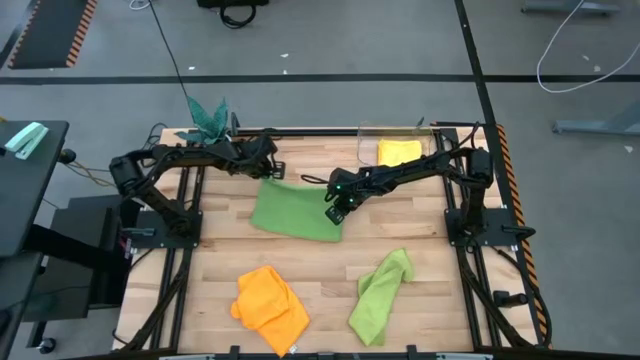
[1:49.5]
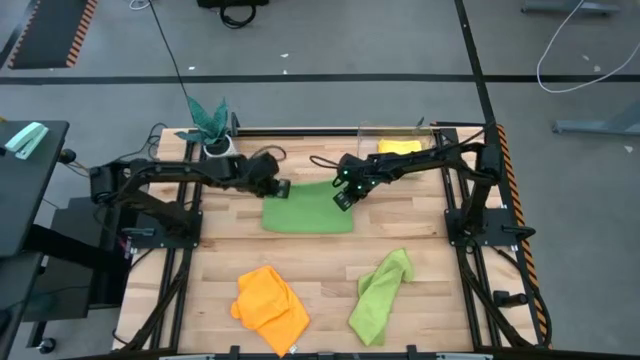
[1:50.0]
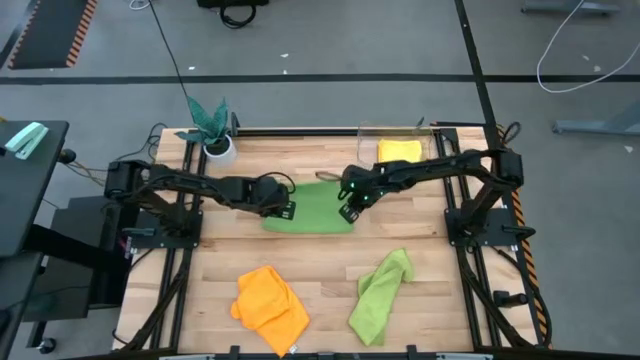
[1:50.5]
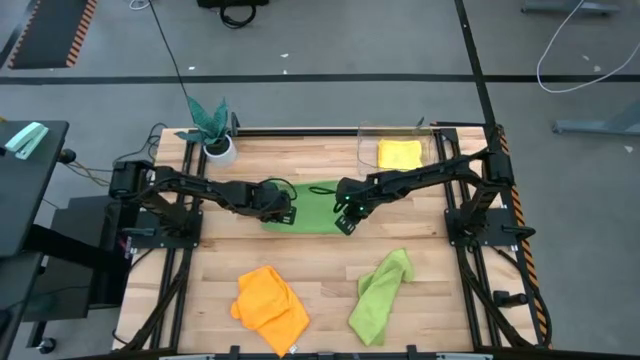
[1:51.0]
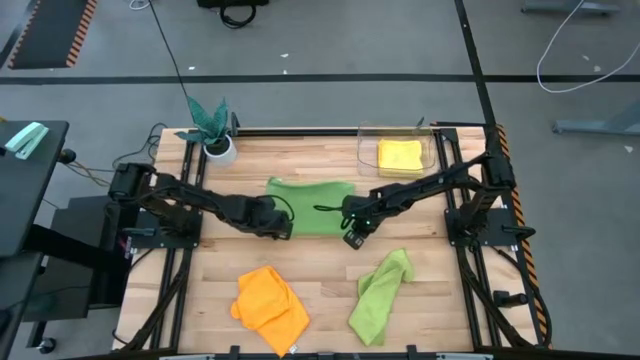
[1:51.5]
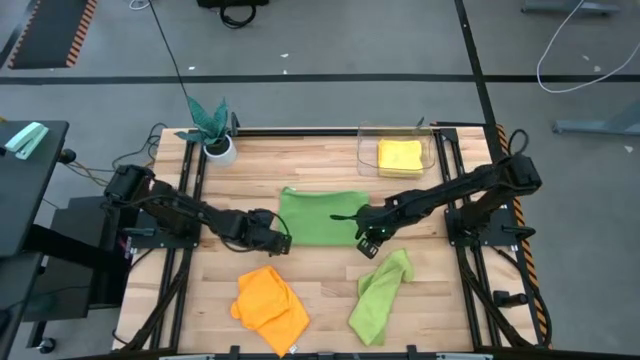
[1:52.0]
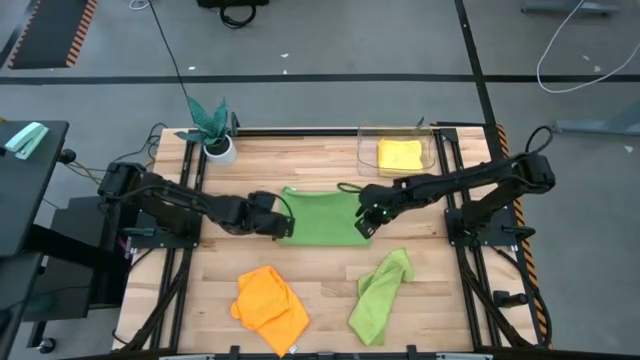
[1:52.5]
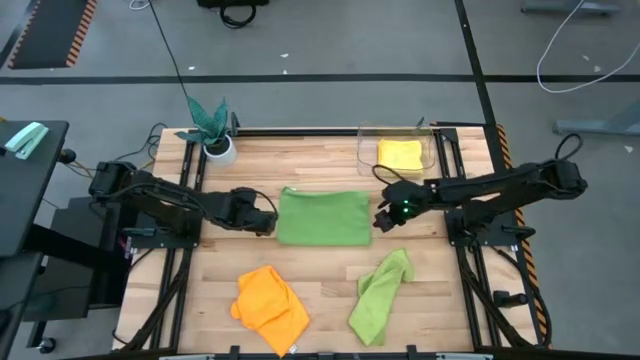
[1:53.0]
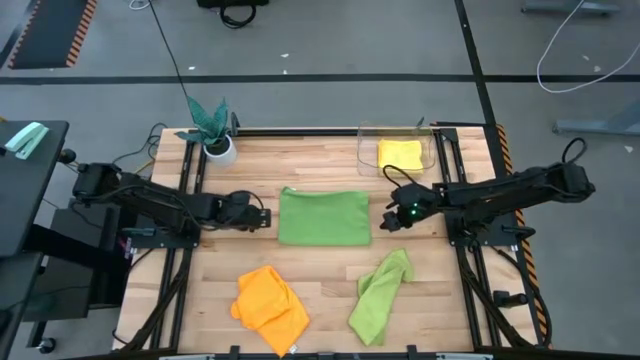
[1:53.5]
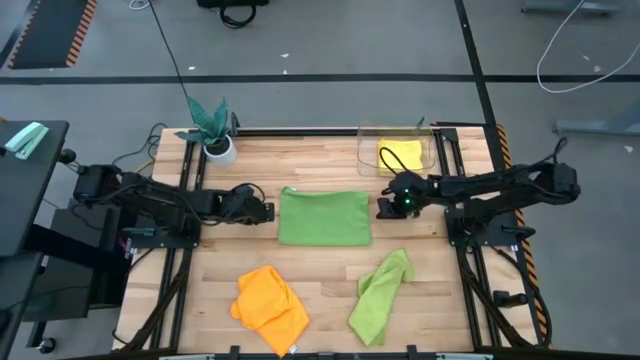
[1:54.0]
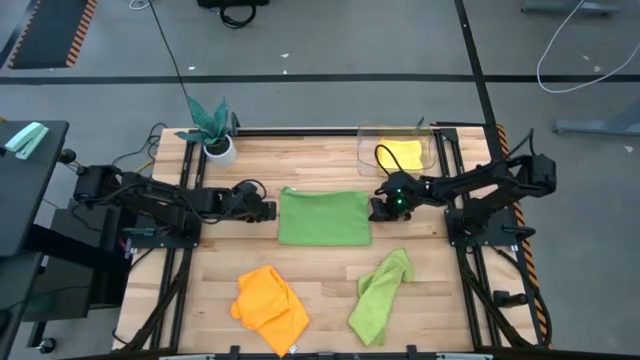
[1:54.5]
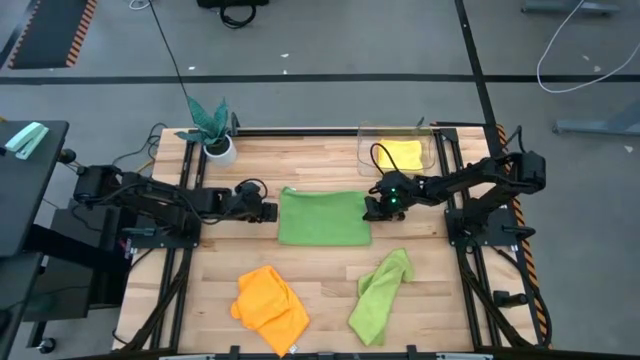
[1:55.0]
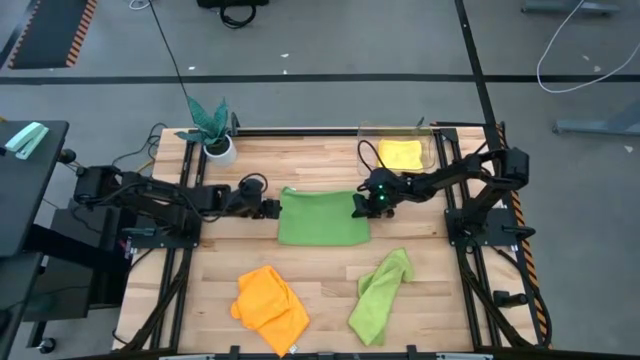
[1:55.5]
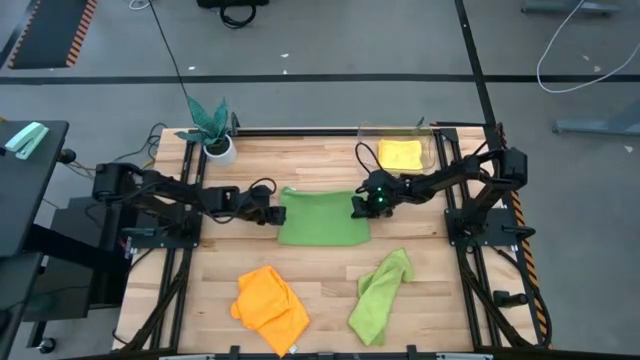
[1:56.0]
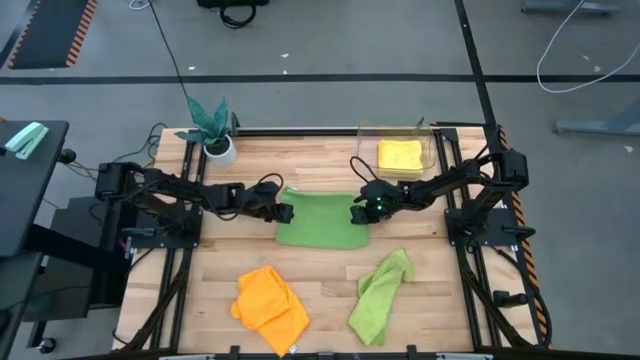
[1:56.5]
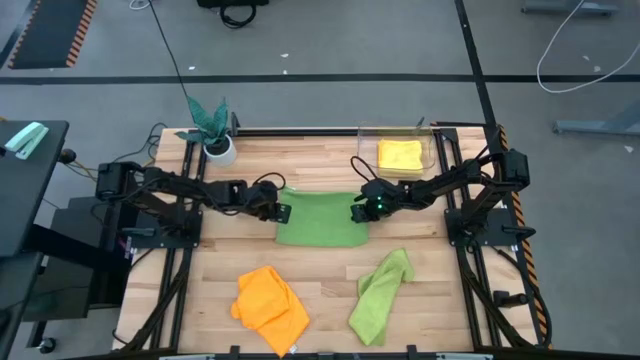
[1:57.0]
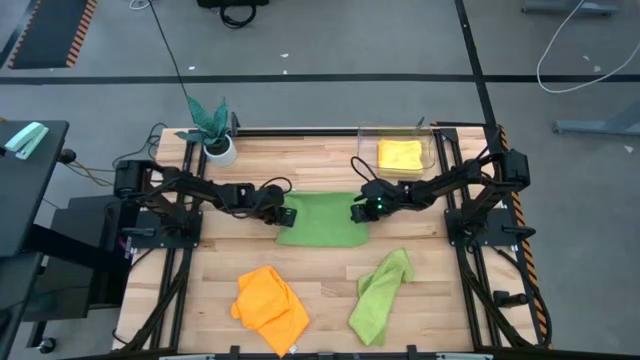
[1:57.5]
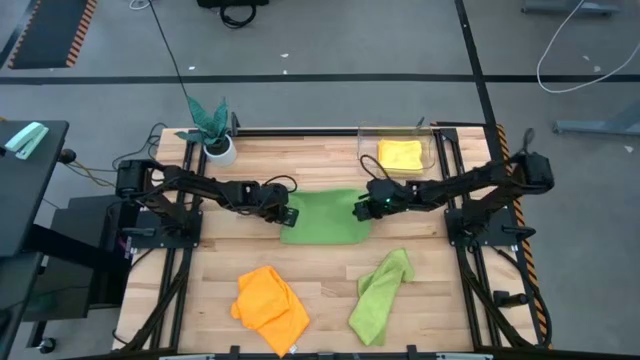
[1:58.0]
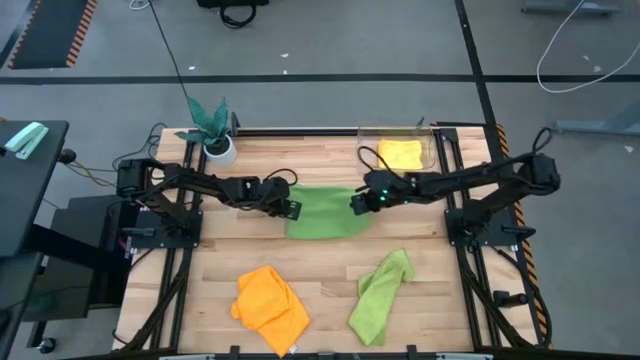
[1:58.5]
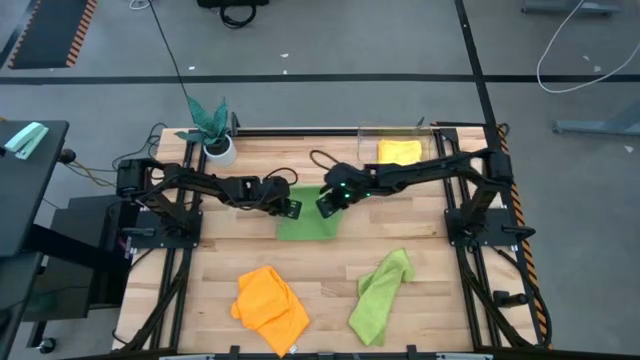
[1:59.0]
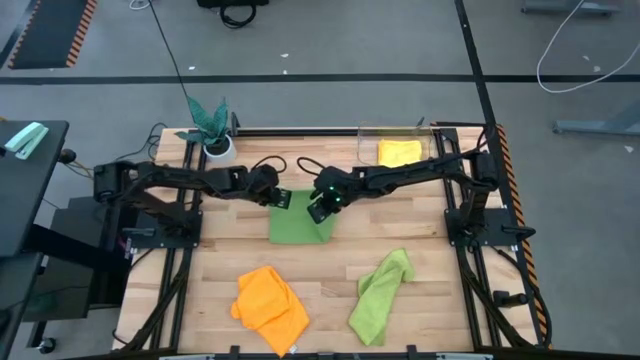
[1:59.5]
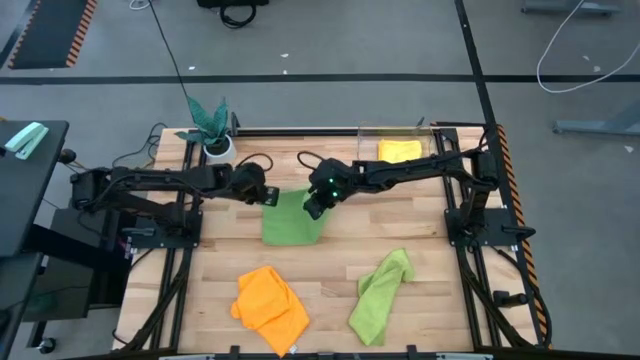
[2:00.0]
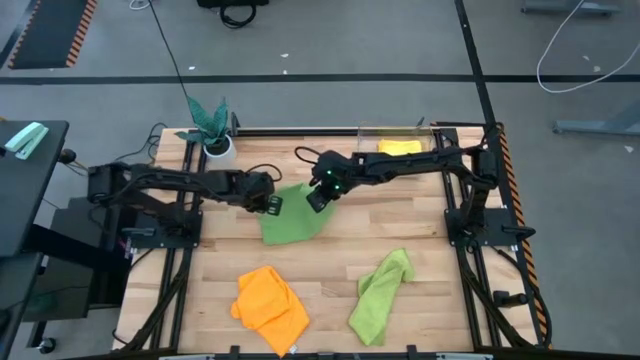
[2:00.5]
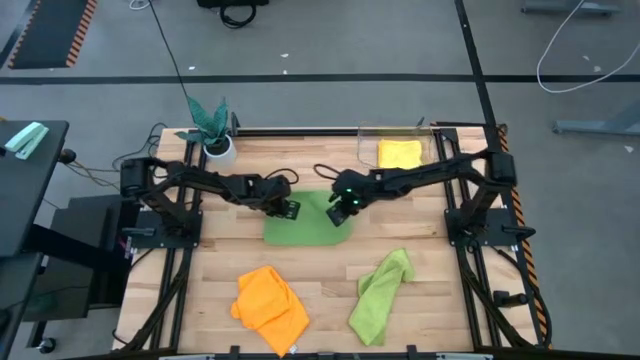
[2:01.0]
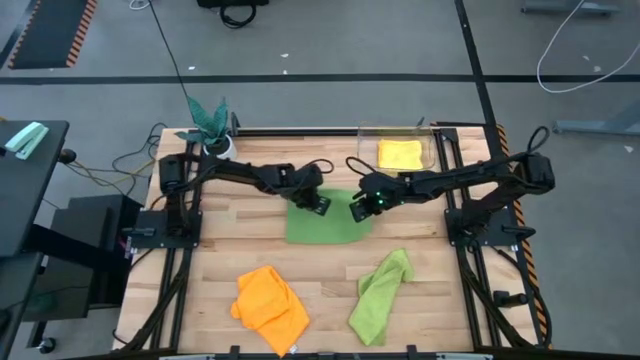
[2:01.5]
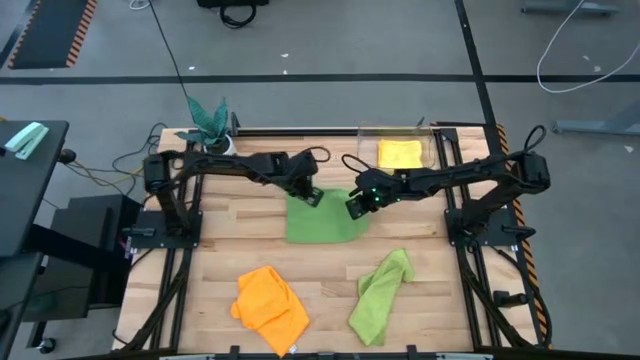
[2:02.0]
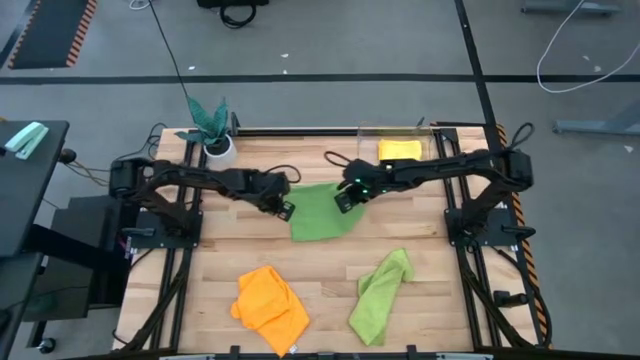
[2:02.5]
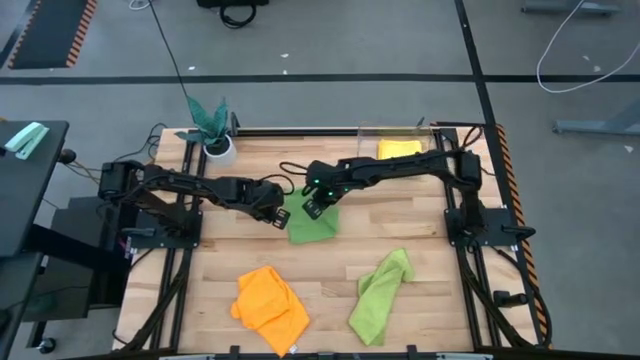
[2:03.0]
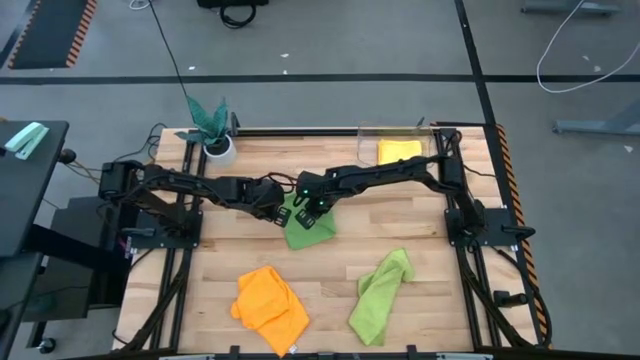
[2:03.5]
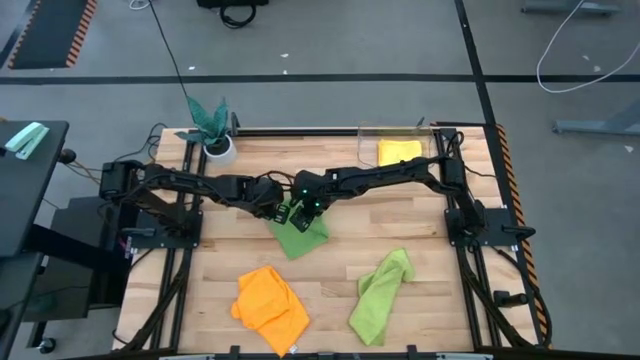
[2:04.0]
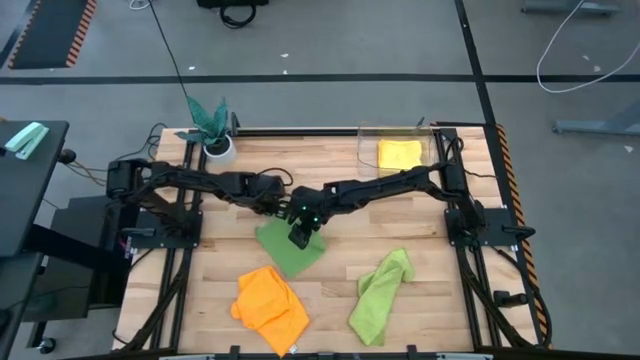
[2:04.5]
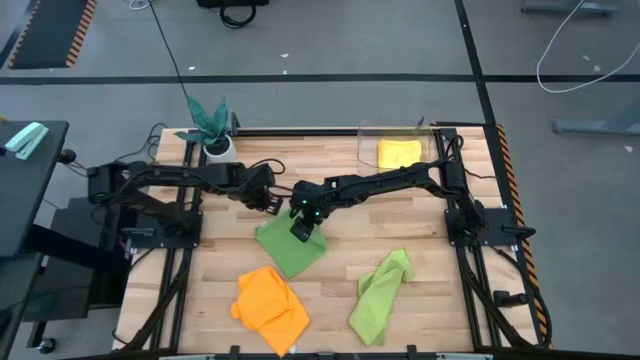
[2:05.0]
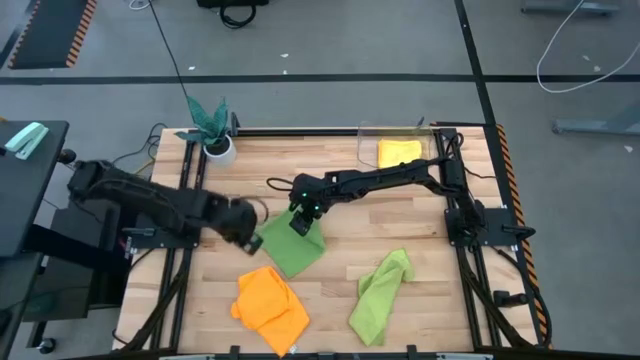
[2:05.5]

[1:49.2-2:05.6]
Task: Fold microfiber towels
Fold the green towel

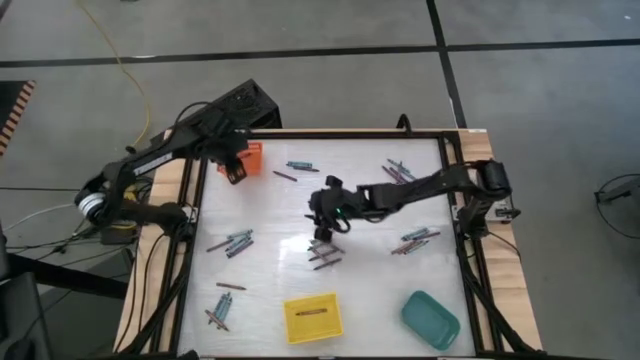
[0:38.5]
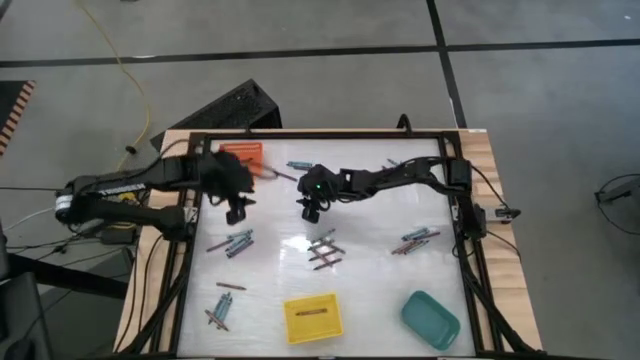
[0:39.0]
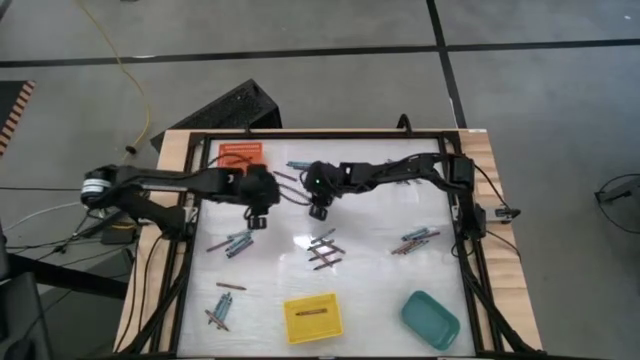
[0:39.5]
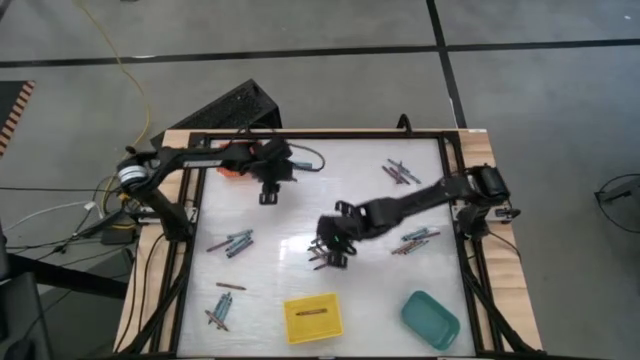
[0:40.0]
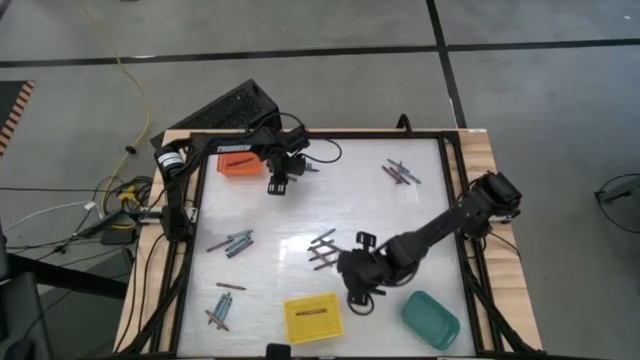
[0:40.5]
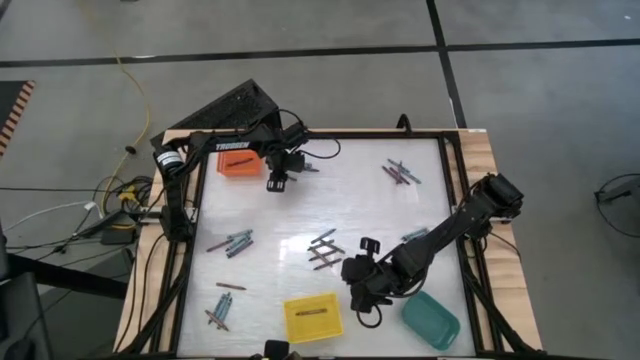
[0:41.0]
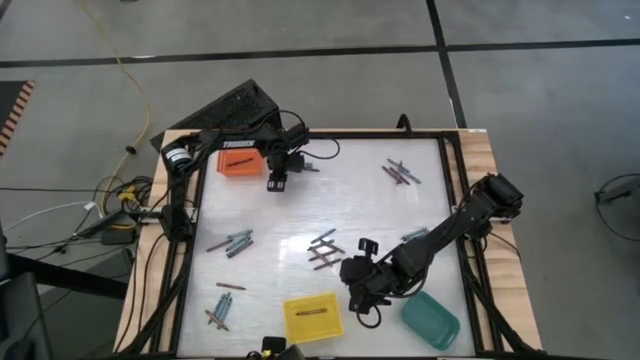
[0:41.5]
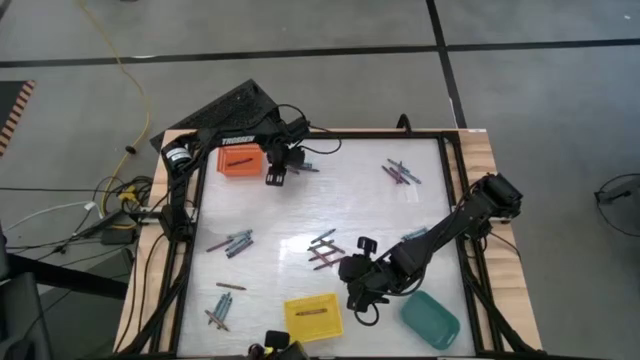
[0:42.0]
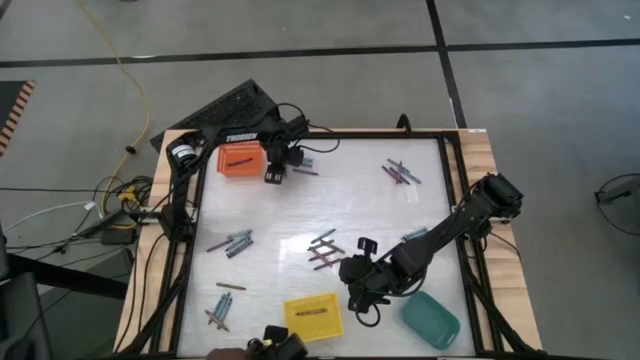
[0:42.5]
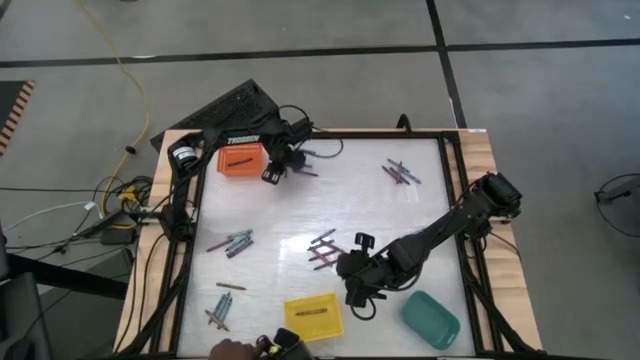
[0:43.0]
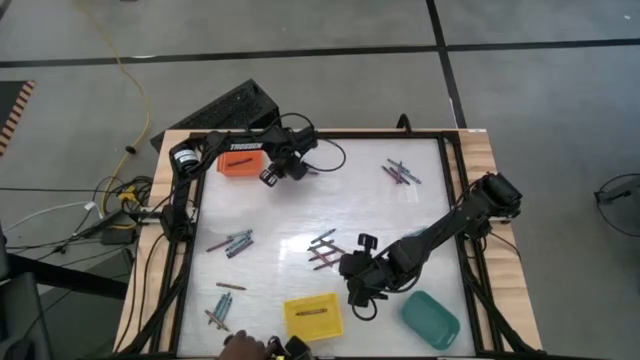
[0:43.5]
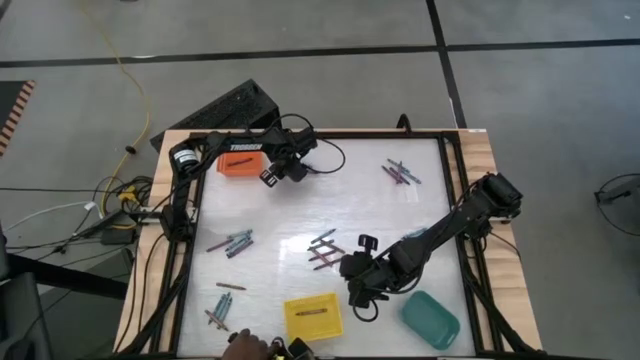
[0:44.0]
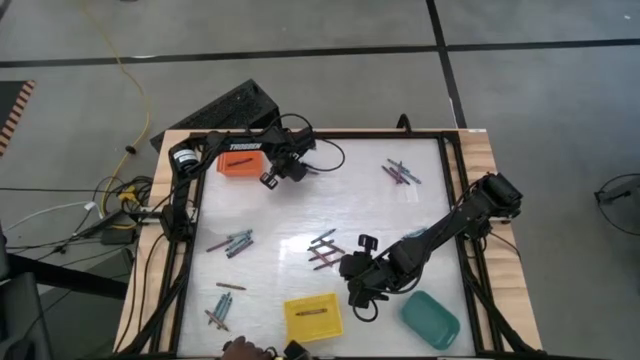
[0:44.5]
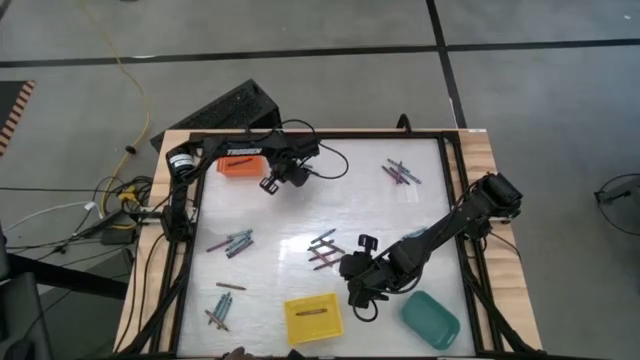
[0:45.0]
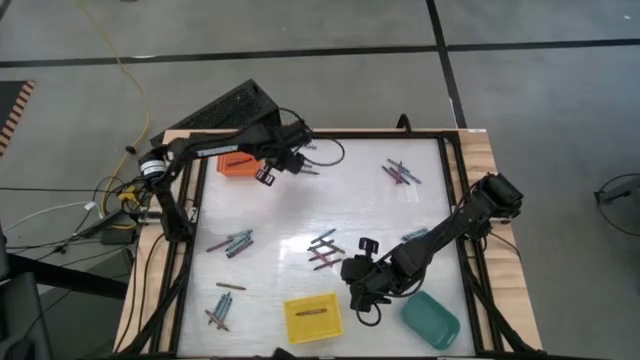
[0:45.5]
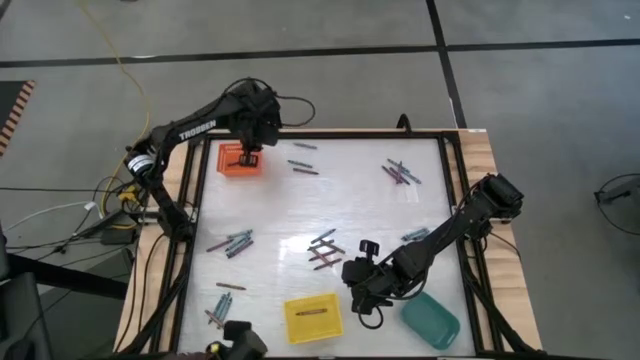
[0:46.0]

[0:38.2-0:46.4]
Task: Sort crayons
Put the pink crayon into the orange bin
